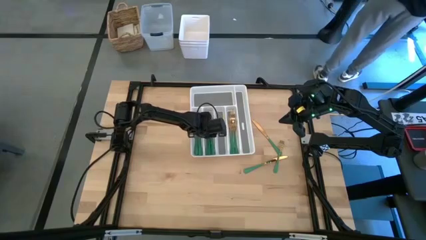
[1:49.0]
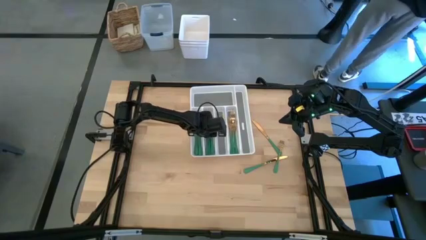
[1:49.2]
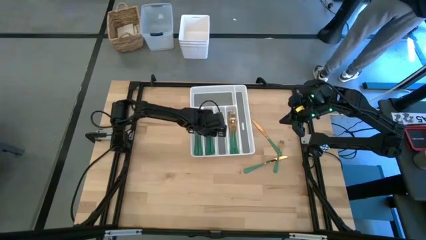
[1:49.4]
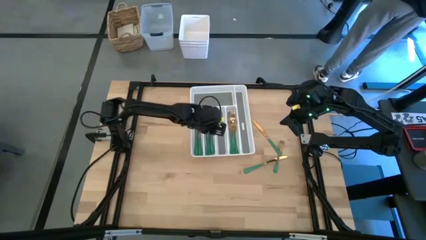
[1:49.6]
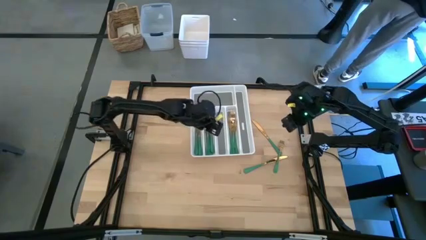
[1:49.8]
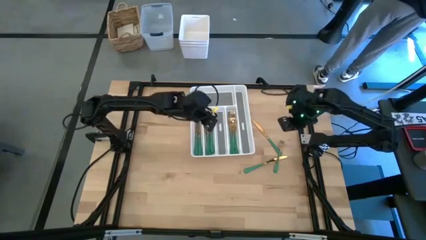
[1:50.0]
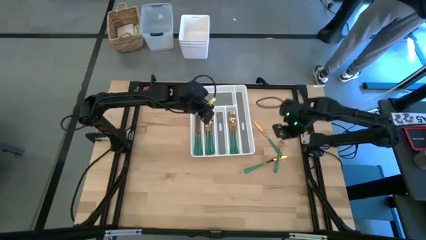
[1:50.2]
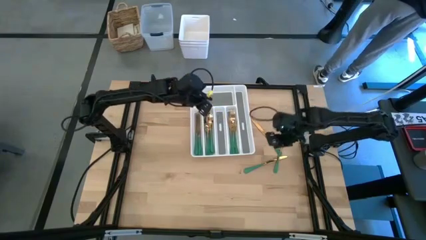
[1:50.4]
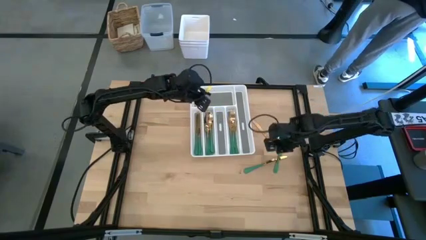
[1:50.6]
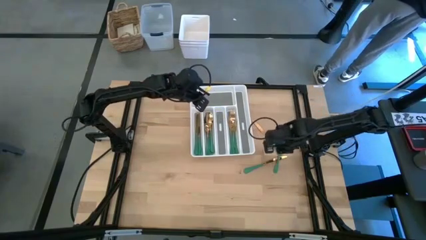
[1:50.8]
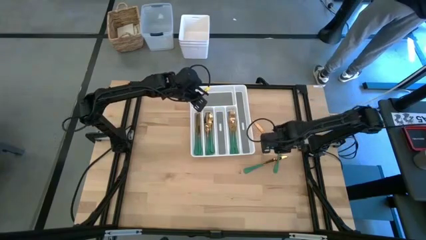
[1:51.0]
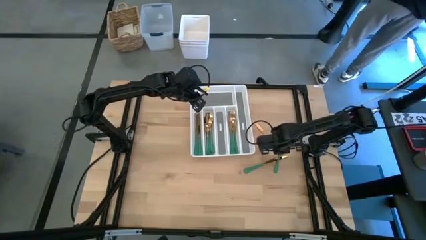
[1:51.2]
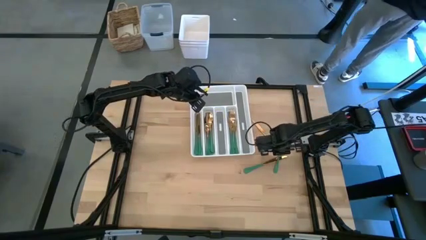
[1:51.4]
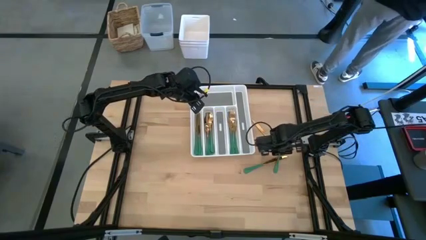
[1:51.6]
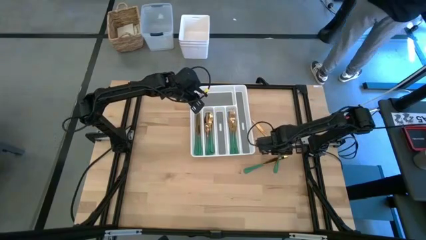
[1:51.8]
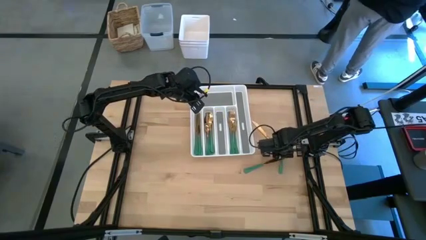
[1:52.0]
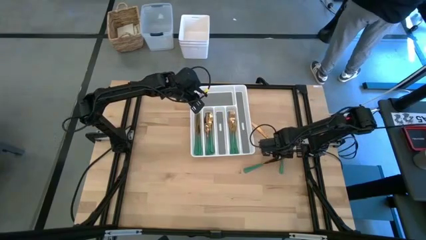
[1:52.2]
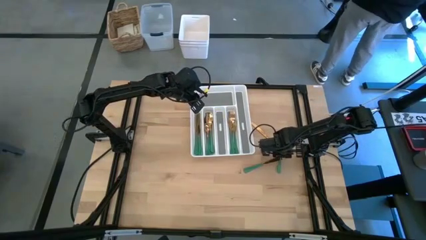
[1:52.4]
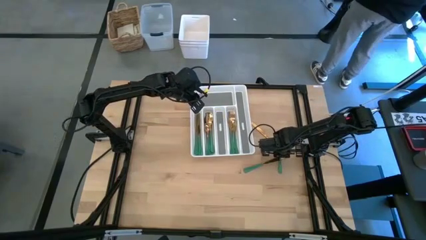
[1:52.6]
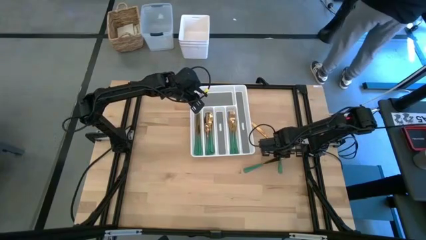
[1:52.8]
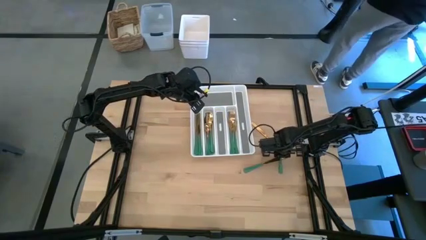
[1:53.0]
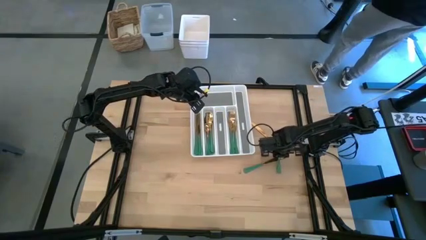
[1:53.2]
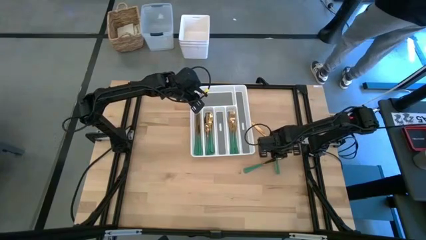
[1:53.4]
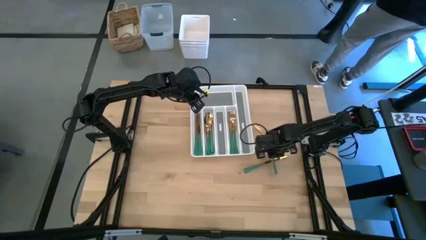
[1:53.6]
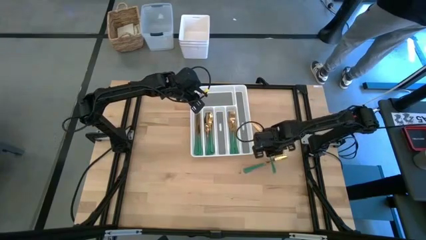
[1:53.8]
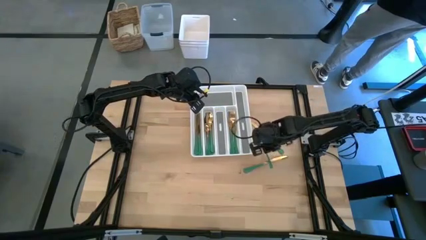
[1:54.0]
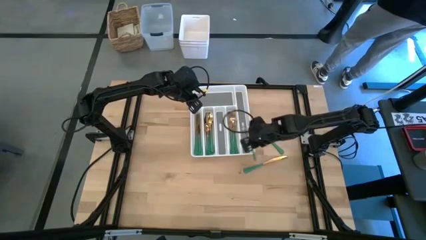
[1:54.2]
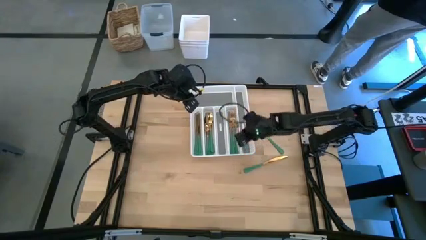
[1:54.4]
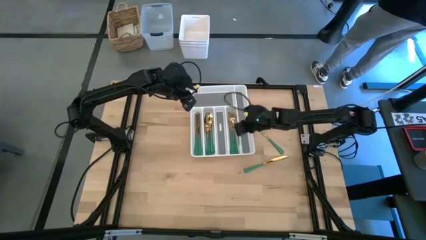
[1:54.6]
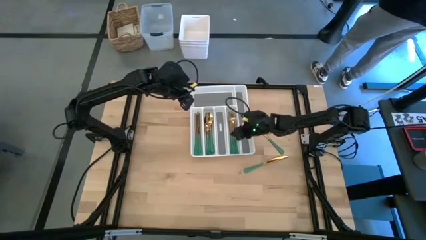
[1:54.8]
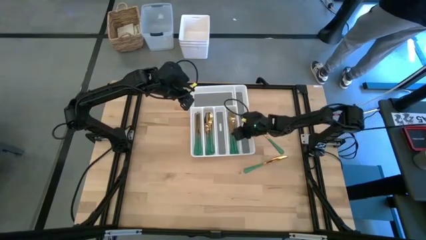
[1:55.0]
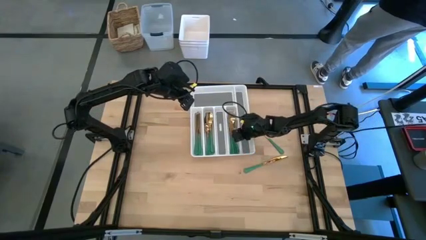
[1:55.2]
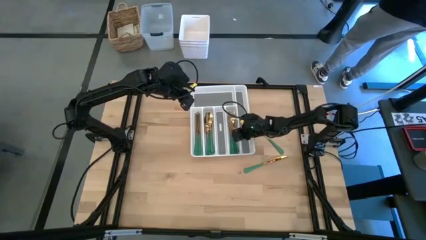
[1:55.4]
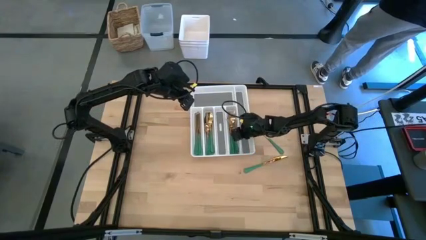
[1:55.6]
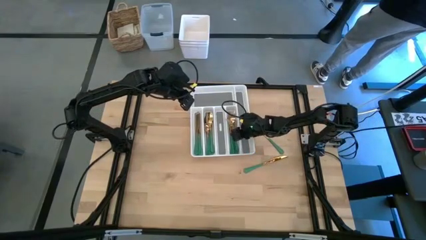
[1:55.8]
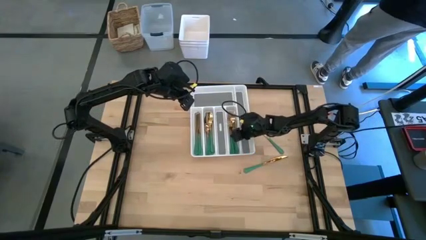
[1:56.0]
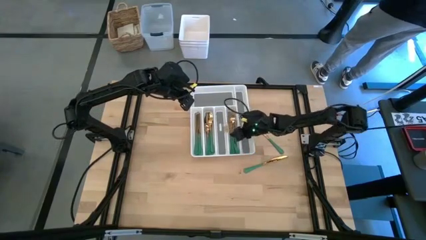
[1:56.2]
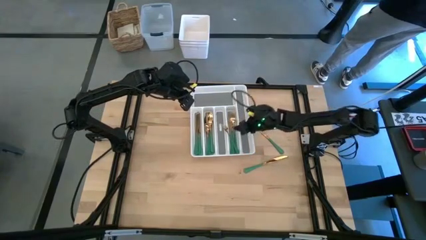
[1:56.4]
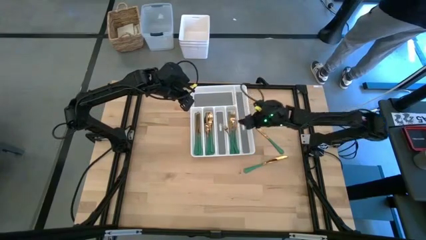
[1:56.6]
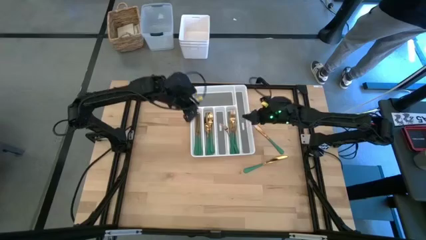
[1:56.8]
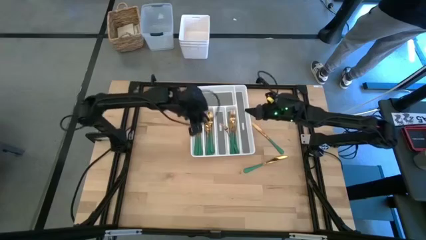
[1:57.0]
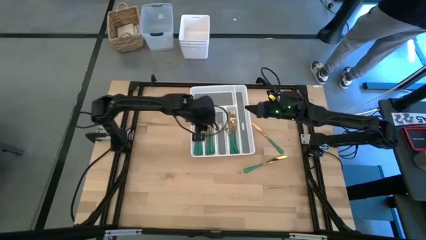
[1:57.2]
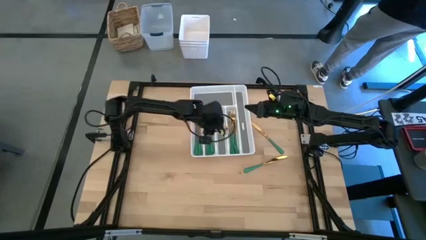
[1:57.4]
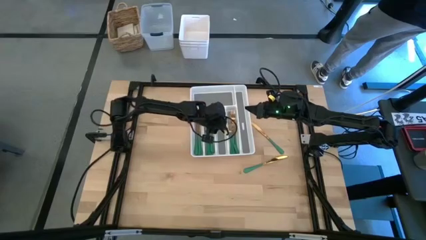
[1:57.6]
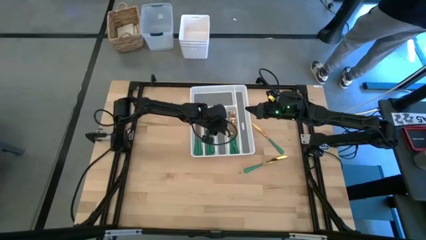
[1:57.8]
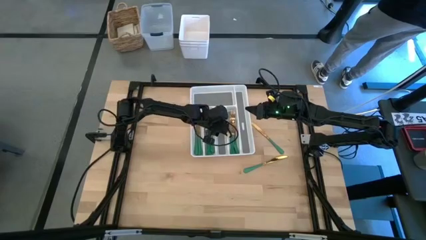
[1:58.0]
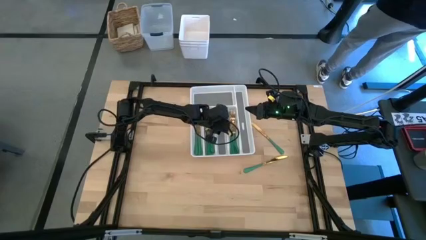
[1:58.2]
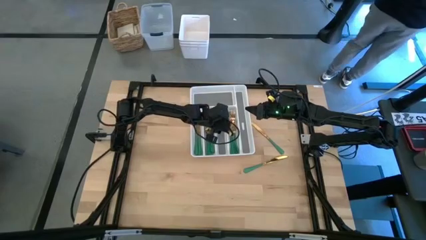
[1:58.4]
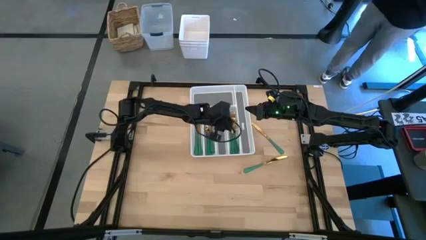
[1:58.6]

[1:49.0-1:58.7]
Task: Sort silverware
Put the fork into the silverware organizer

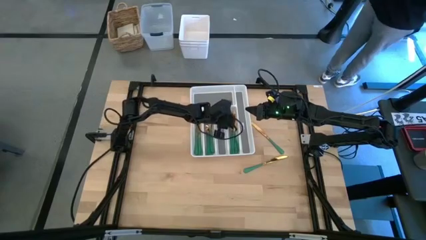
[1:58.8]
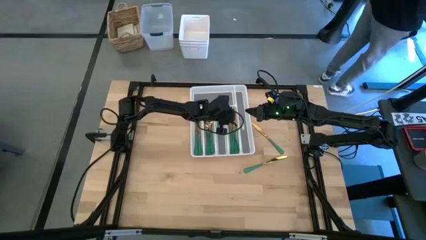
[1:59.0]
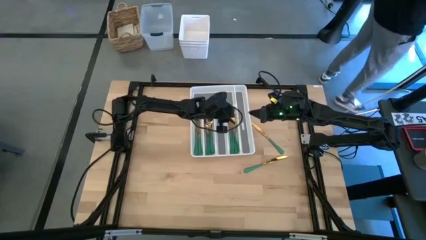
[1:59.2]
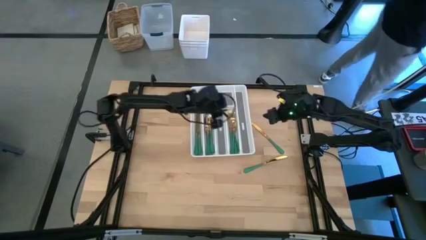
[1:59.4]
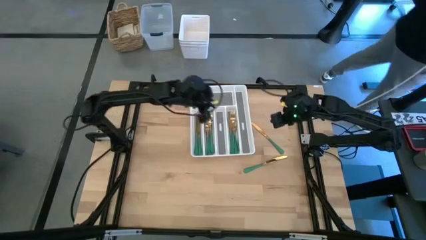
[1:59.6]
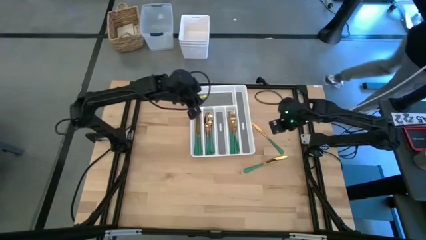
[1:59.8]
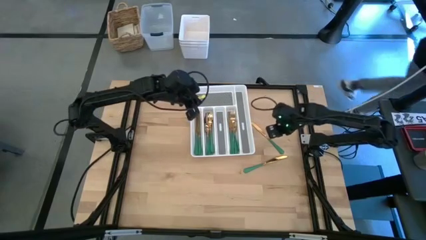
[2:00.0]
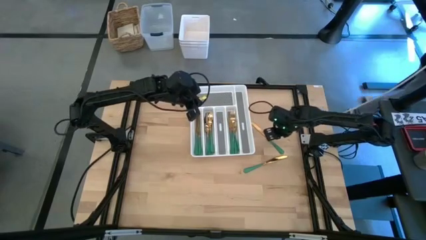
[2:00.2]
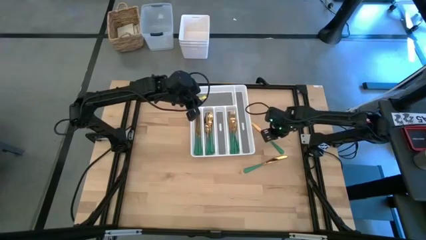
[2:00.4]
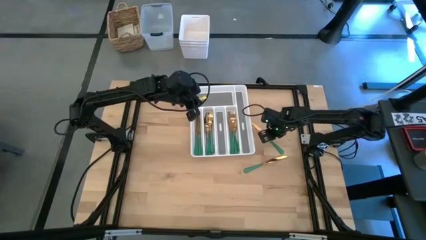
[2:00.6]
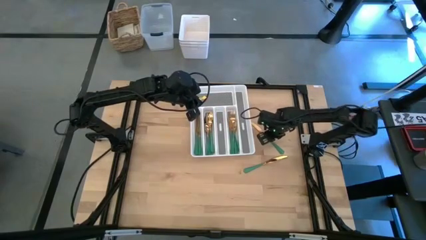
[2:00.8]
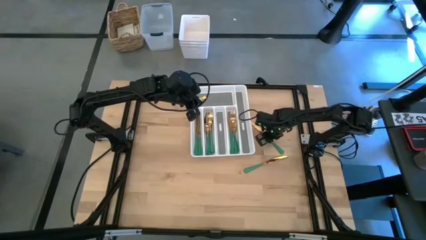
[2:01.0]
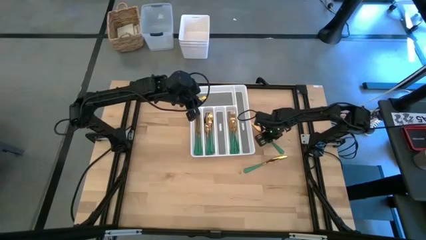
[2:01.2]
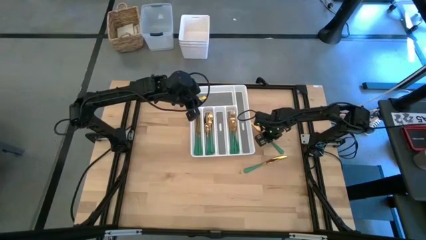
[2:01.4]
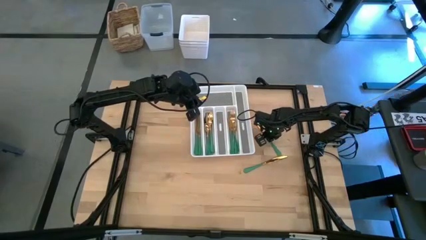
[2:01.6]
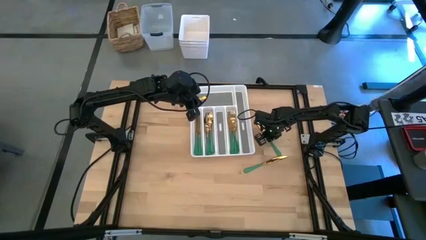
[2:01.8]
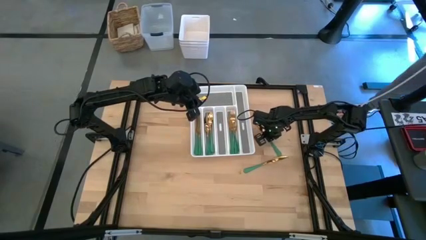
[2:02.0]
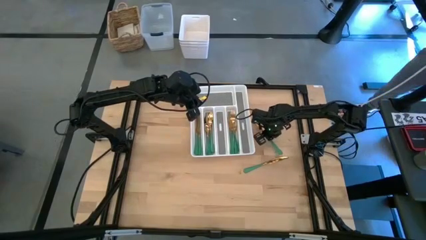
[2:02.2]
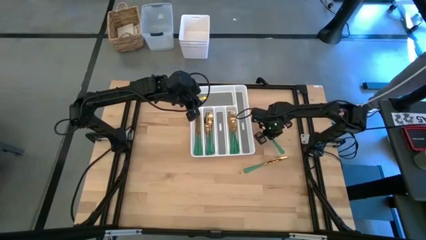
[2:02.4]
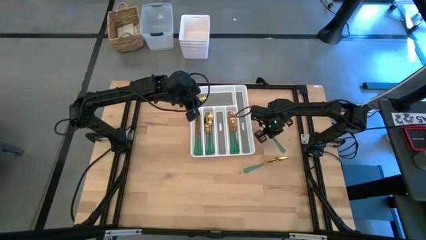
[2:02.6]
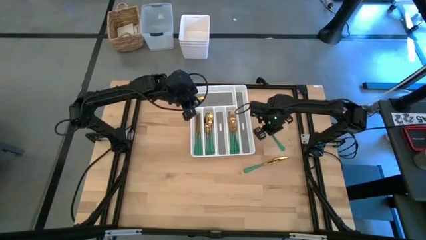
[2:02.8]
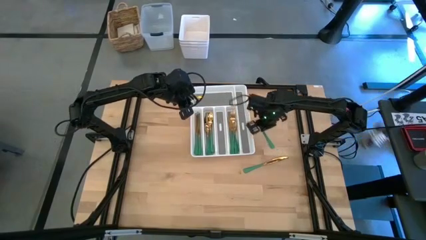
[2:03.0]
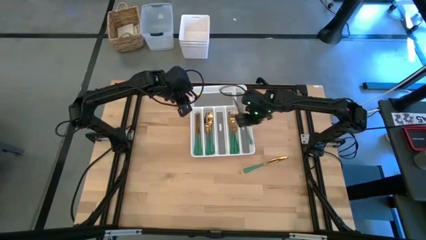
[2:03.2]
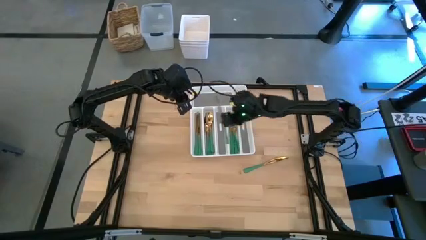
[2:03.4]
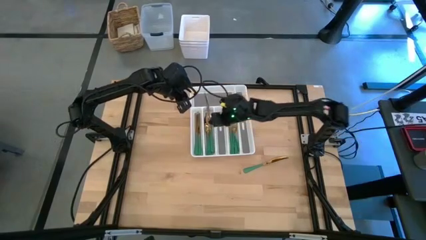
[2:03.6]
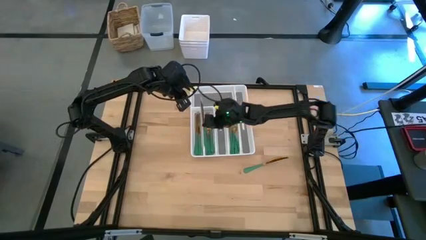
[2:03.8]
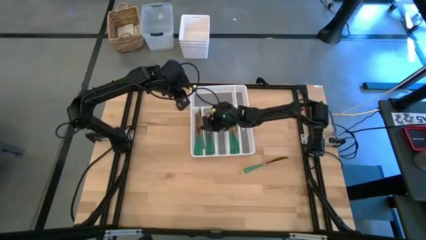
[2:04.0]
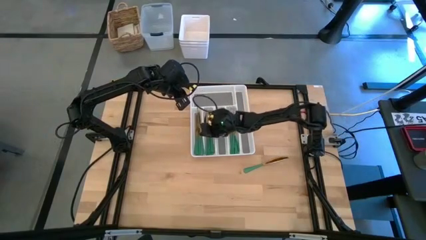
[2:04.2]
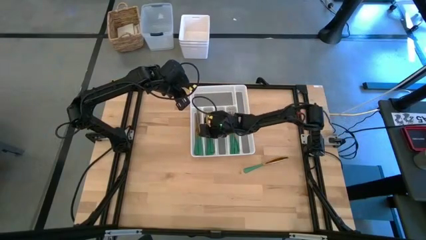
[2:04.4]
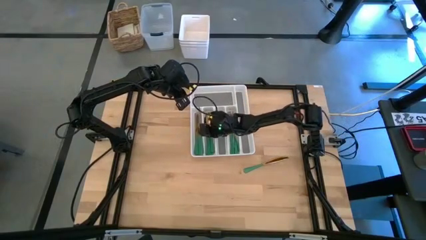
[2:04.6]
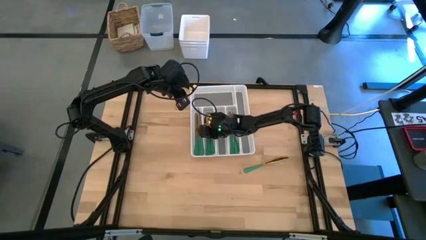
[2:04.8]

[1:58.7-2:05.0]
Put the top knife into the silverware organizer
